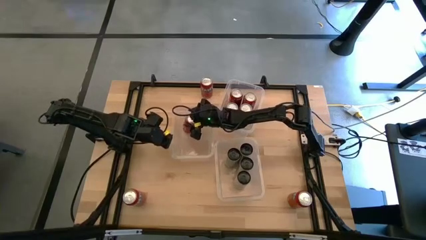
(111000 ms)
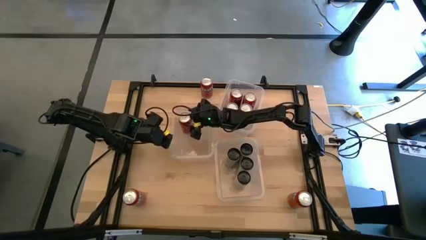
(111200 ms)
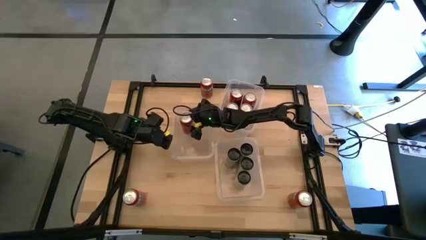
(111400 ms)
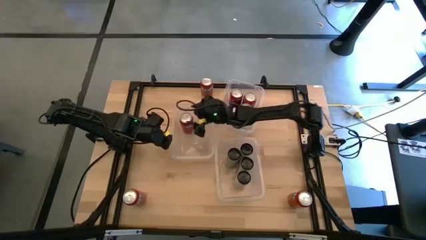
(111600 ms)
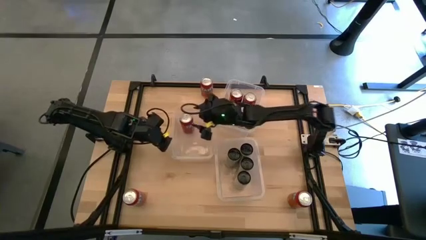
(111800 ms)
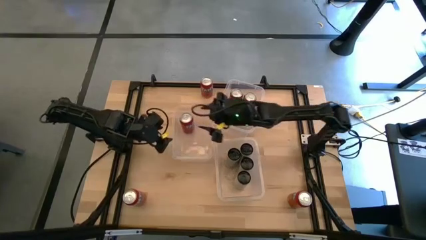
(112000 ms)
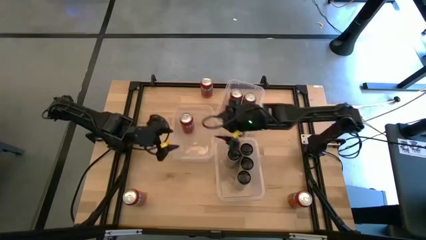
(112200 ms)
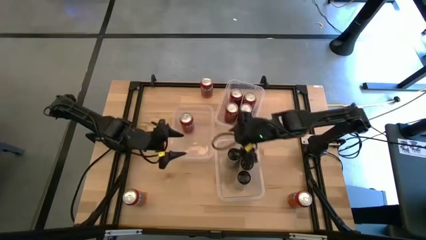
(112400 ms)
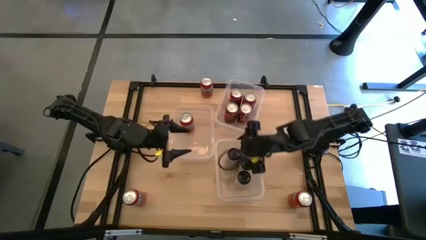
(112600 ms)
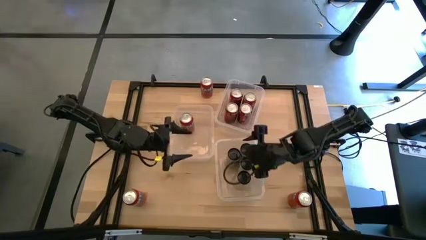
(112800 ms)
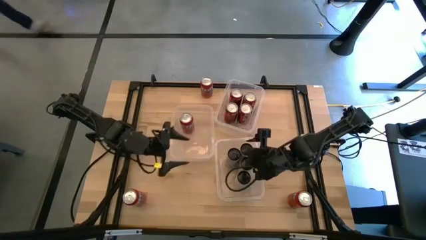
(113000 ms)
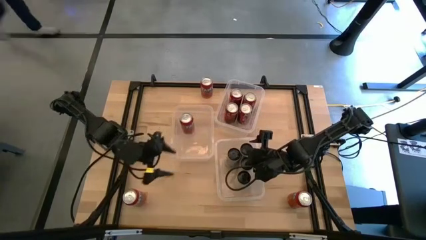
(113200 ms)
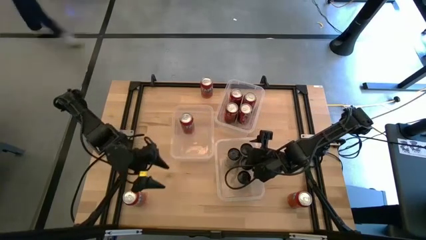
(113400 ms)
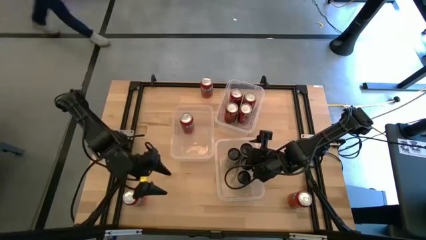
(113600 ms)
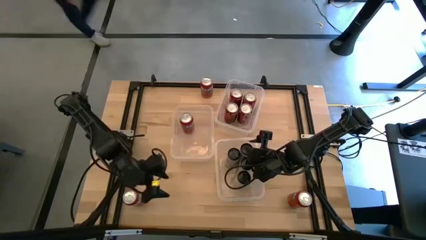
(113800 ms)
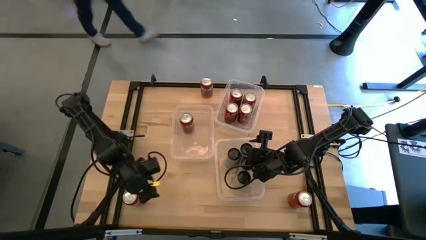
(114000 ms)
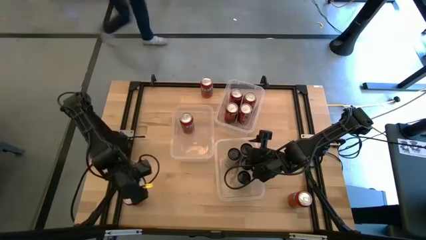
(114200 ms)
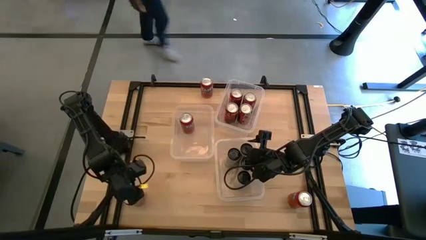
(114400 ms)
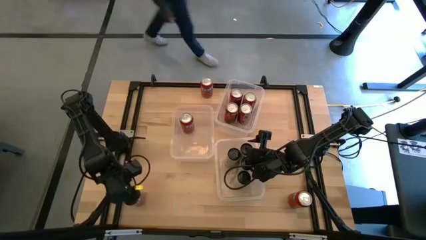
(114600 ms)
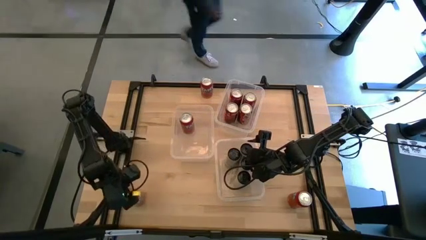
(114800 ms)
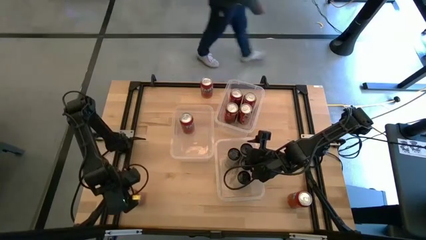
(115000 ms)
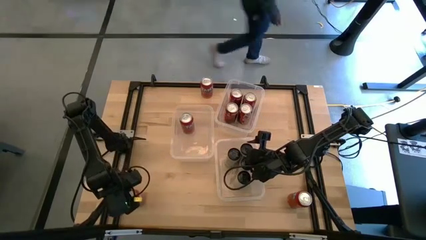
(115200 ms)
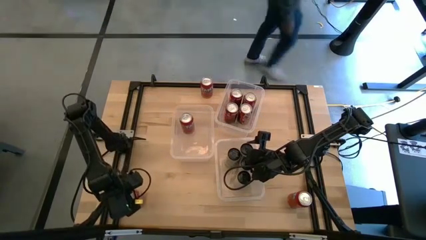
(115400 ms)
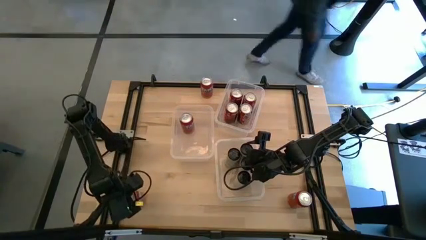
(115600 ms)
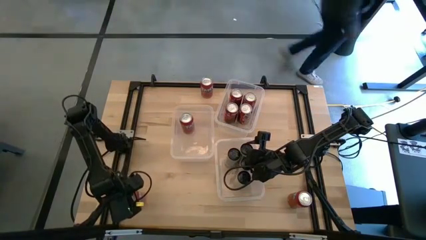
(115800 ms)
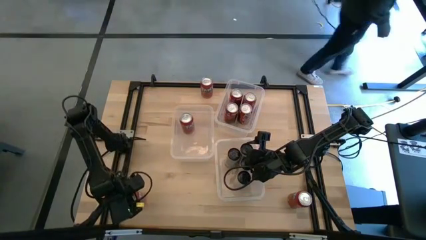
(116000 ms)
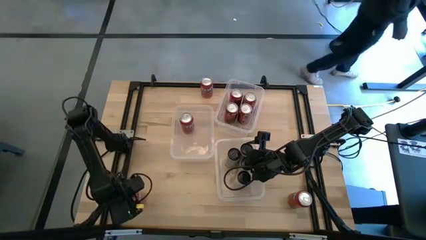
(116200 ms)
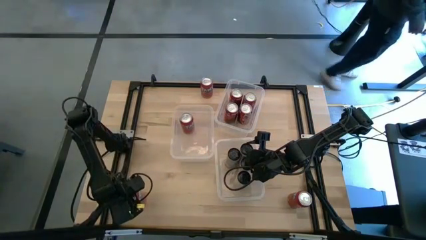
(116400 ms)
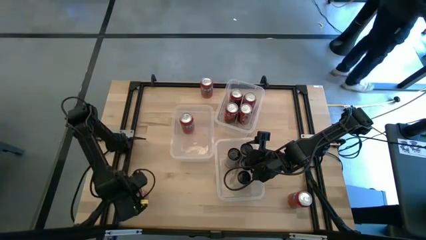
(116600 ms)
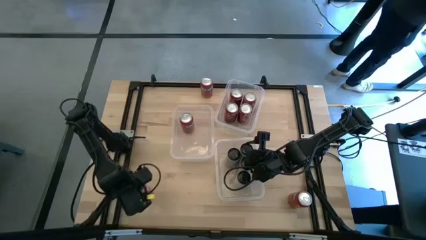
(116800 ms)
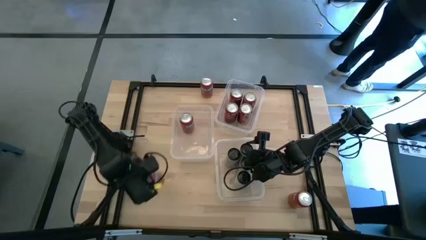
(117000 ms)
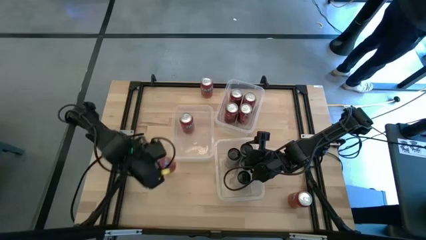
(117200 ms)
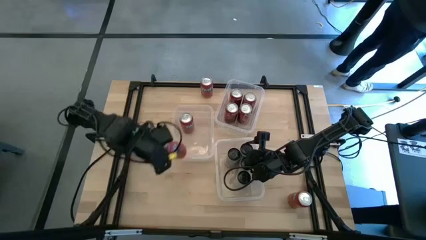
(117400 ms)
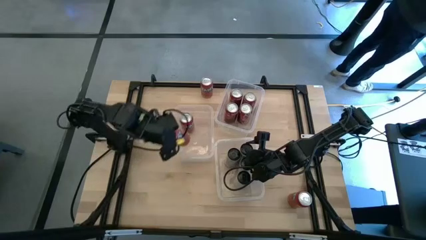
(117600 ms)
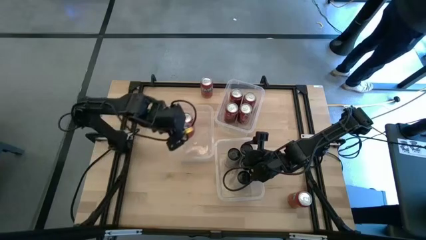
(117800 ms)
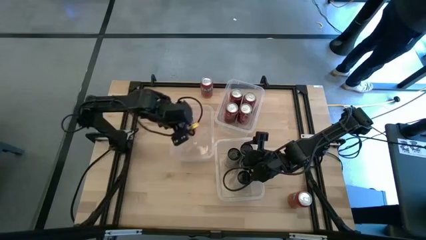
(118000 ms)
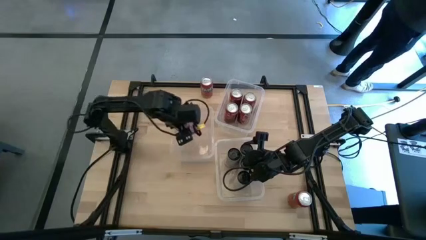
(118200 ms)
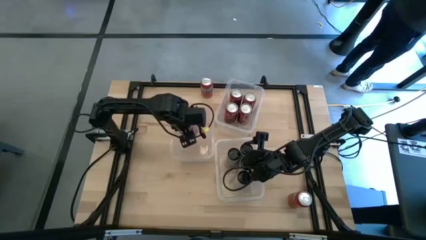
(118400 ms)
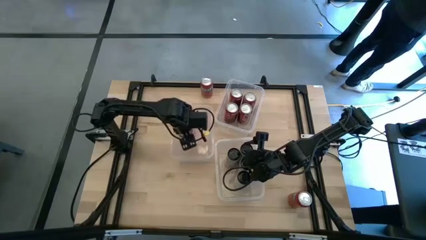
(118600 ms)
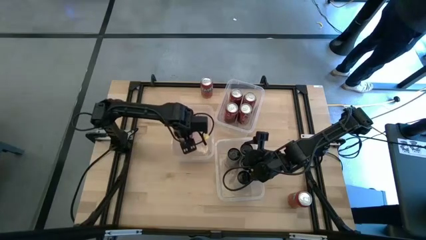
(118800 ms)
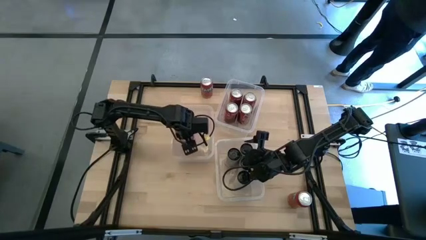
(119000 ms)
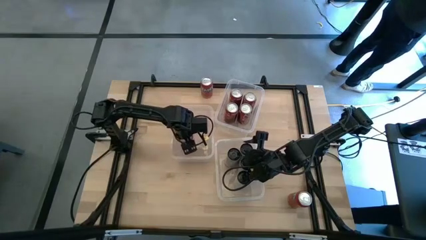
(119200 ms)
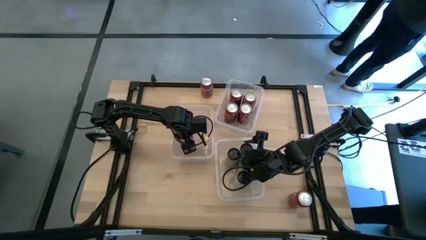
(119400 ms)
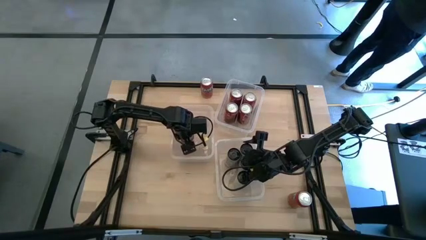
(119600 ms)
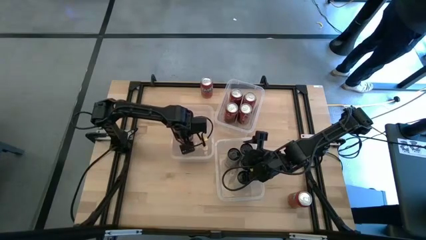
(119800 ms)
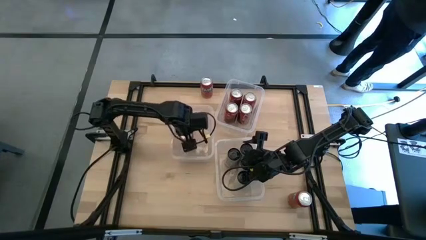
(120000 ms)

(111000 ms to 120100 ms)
Task: Sort soda cans
Put the red soda can into the middle transparent bin

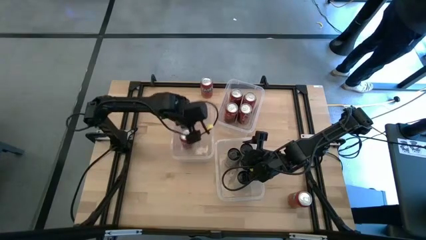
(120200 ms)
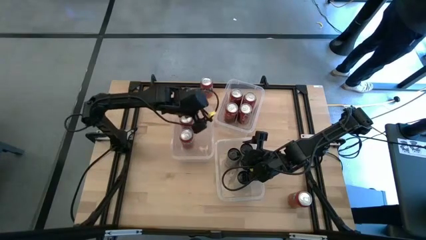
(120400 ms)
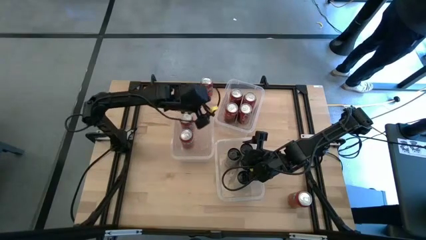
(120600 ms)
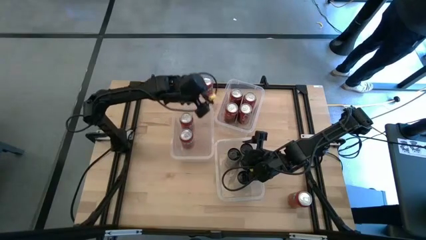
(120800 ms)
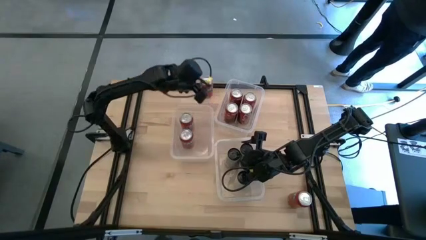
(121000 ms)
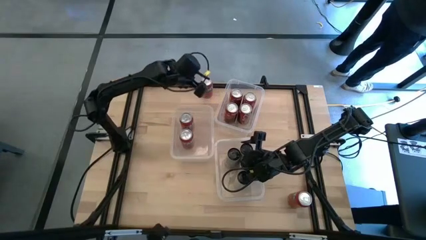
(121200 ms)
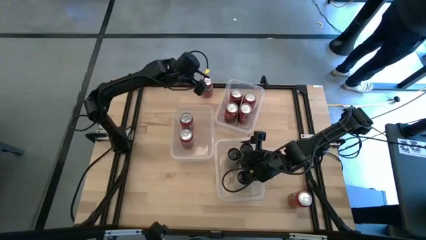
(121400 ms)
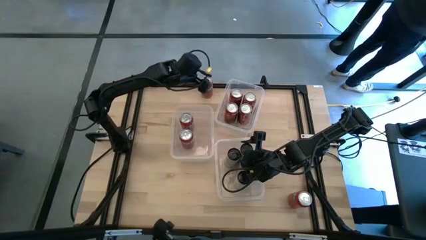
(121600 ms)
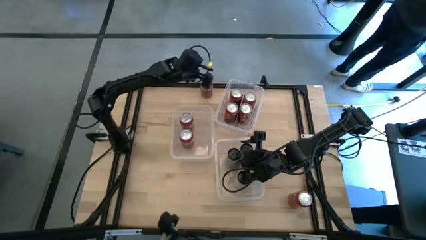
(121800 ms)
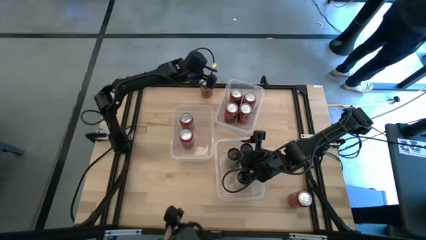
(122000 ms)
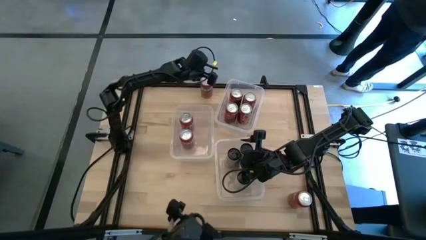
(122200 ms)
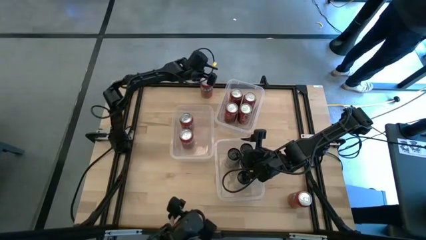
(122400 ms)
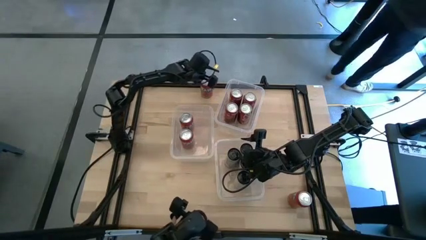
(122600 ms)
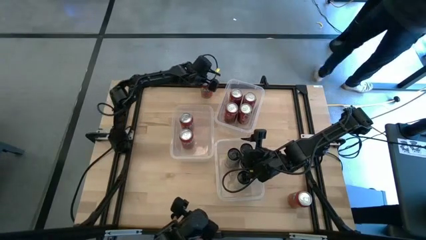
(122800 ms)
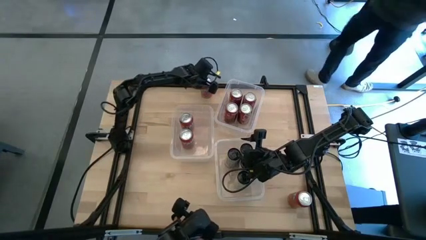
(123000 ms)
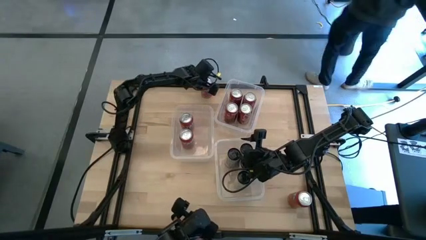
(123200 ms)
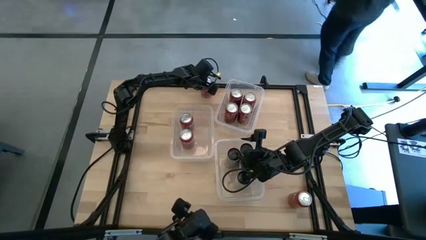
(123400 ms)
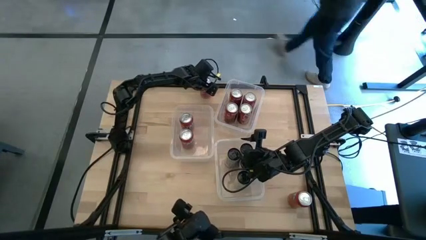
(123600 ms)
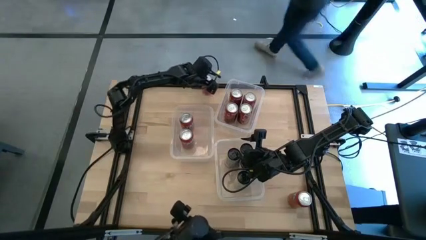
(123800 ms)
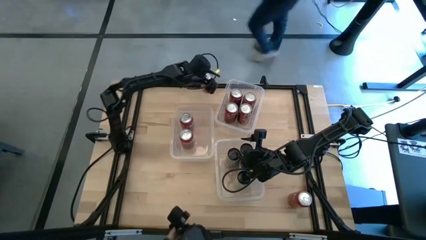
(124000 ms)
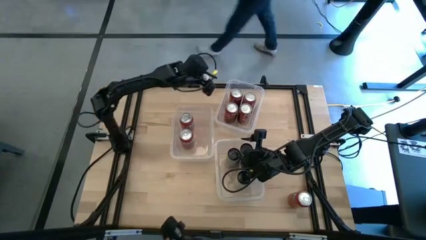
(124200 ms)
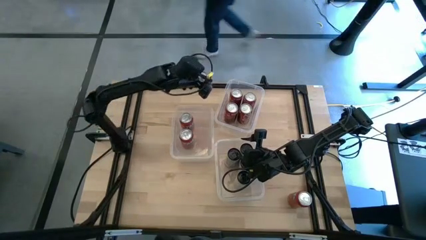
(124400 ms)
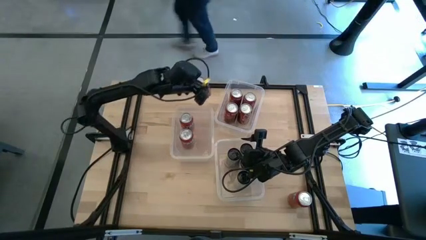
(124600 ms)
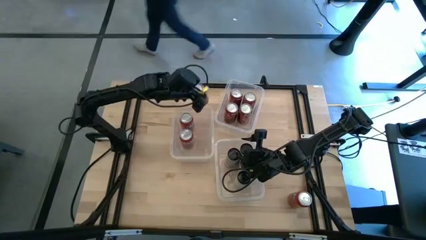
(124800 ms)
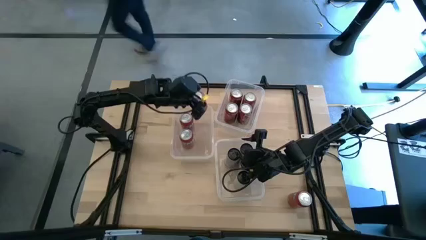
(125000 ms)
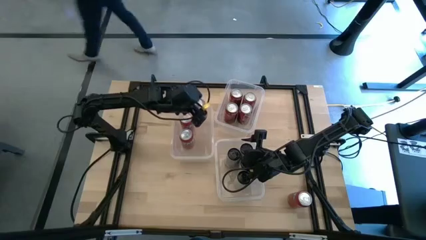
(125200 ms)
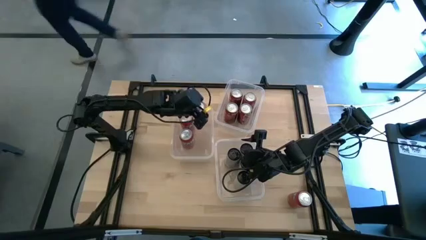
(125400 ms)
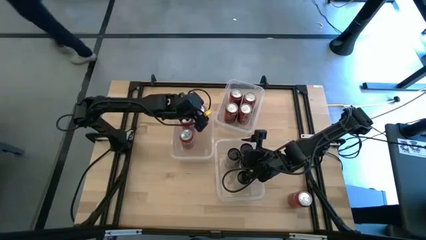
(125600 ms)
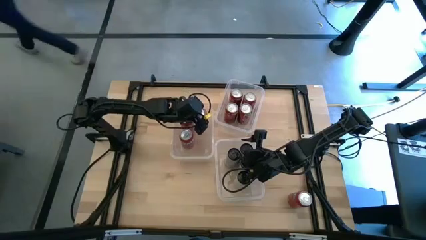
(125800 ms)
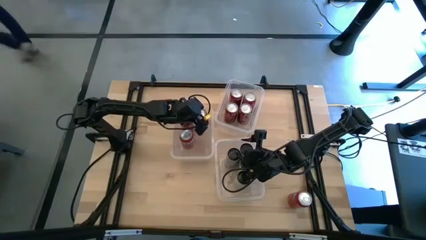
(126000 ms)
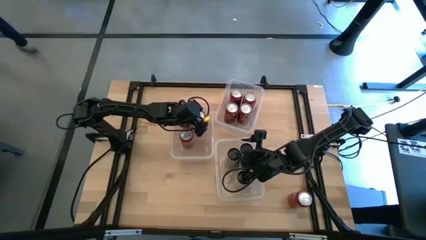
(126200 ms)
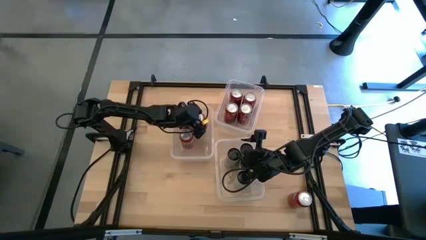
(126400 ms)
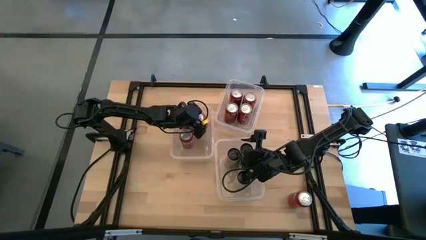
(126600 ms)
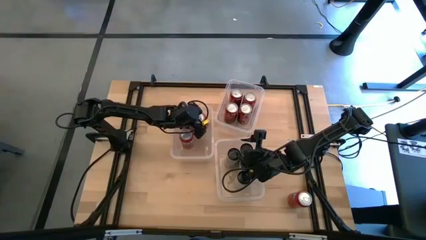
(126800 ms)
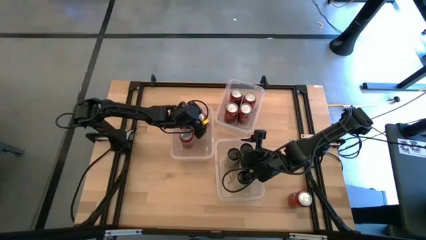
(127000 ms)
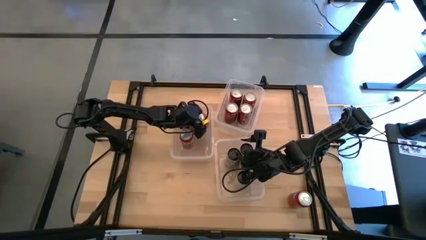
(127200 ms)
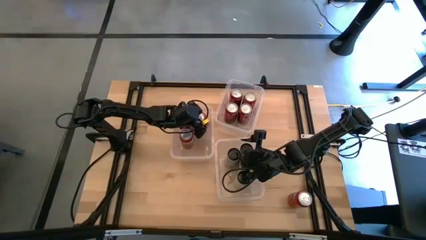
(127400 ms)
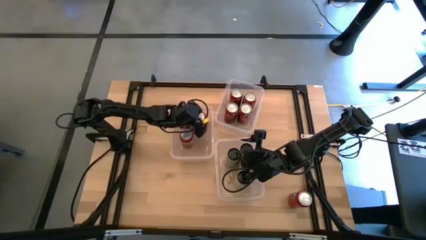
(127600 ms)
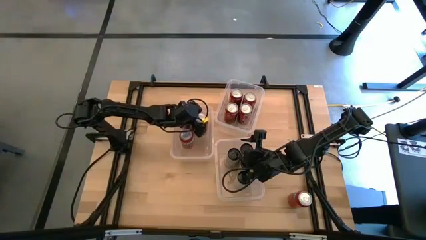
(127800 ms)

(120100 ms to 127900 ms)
Put the red soda can into the middle transparent bin
